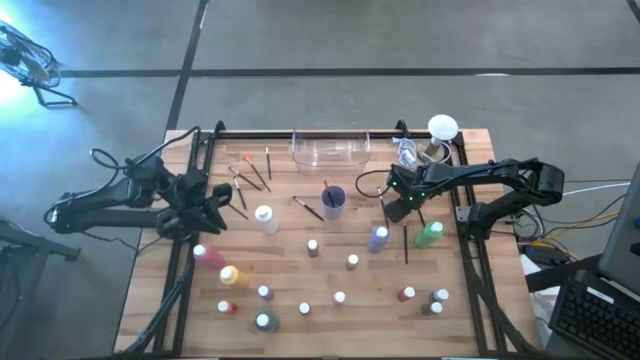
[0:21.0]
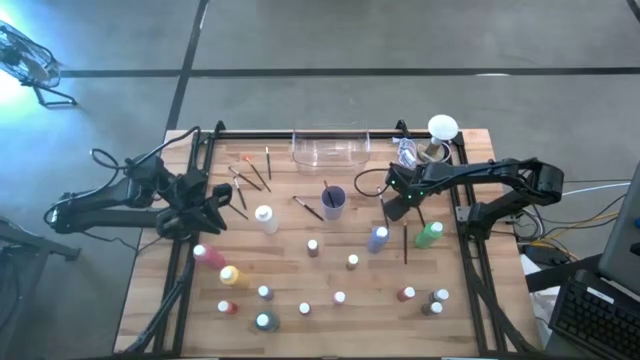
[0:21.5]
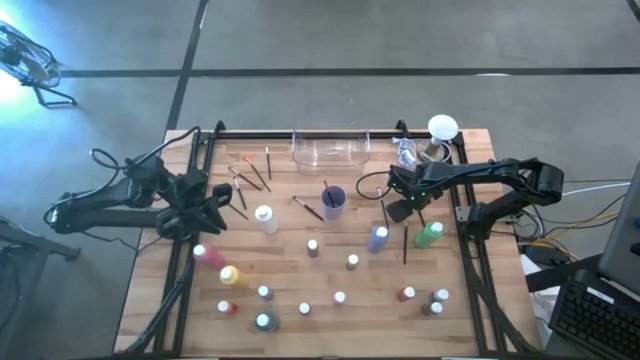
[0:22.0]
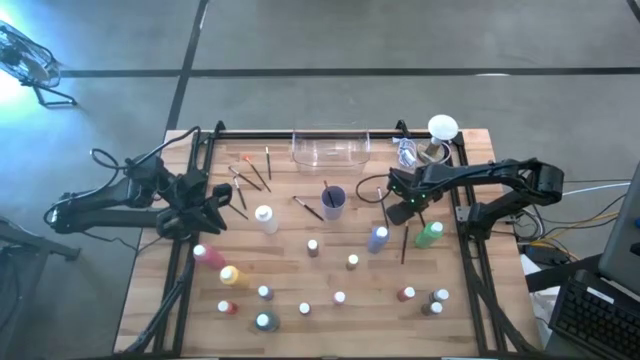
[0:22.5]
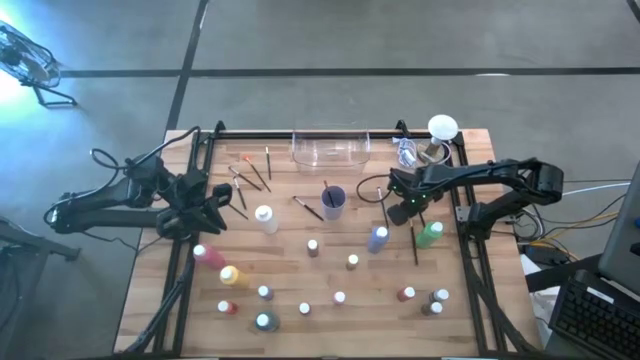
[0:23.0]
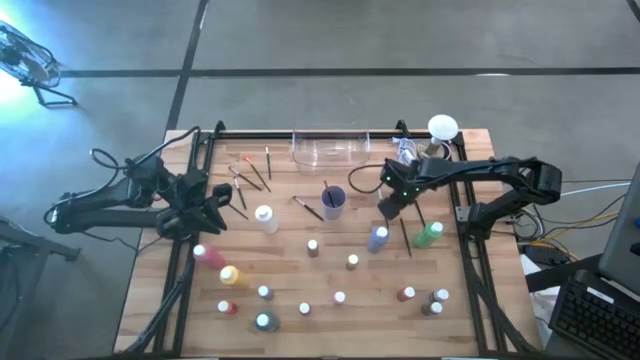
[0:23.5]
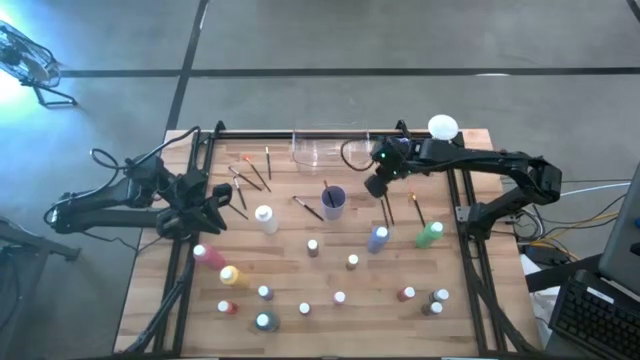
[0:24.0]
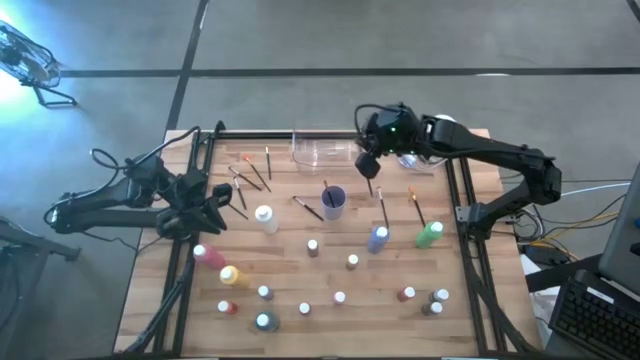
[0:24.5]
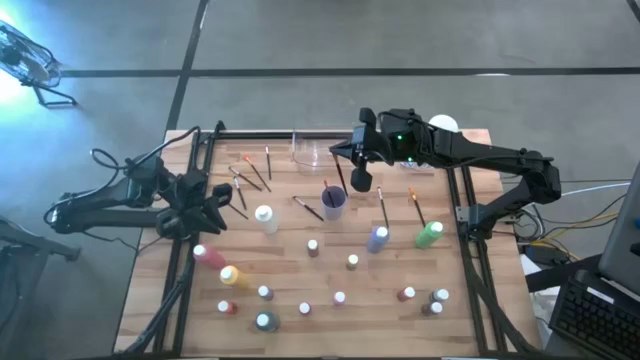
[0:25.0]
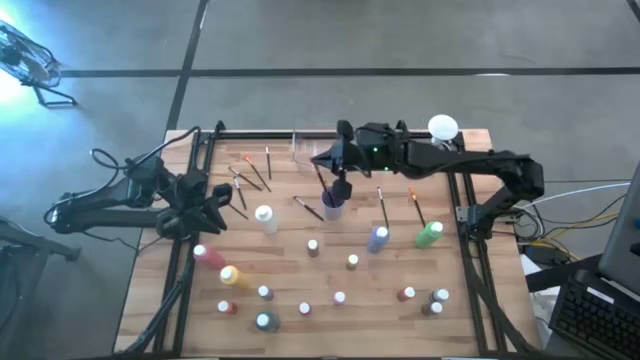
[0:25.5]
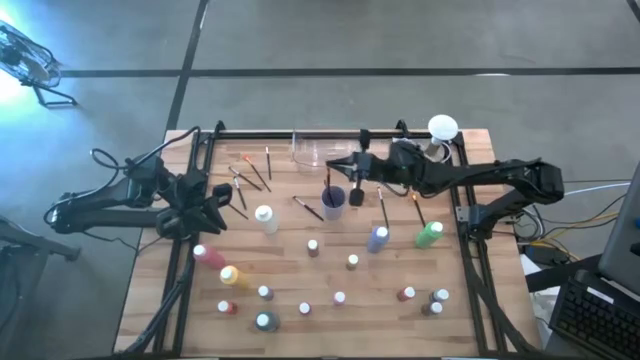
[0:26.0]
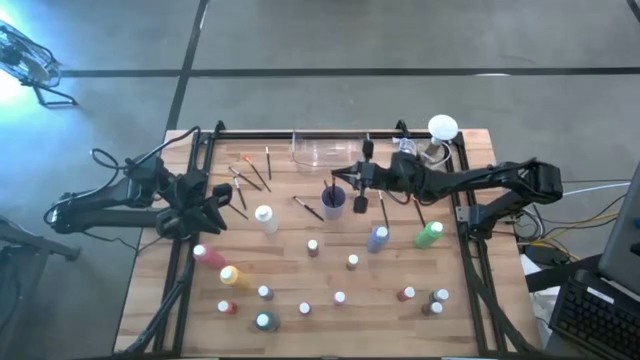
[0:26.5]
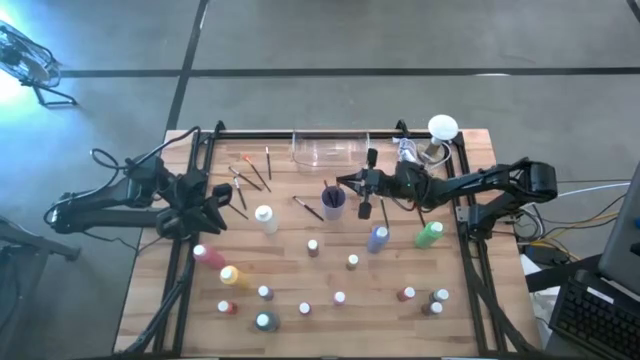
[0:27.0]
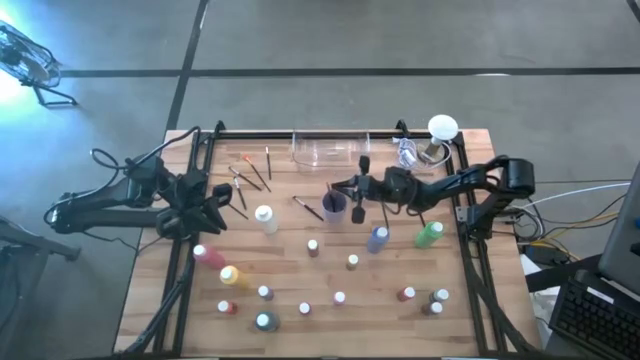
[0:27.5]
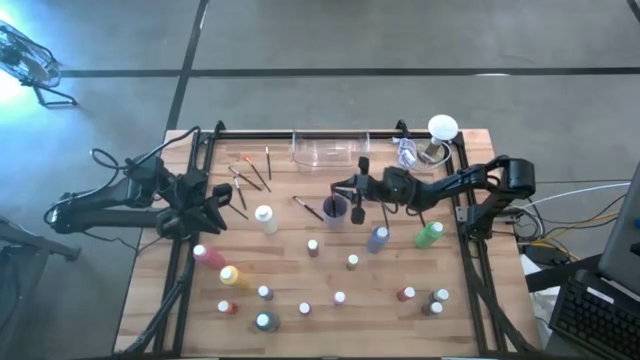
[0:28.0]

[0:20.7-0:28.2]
Task: Pick & Place Paint Supplies
Put the gold paint brush into the purple cup

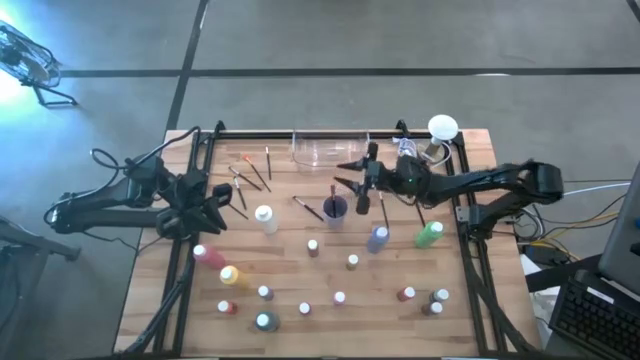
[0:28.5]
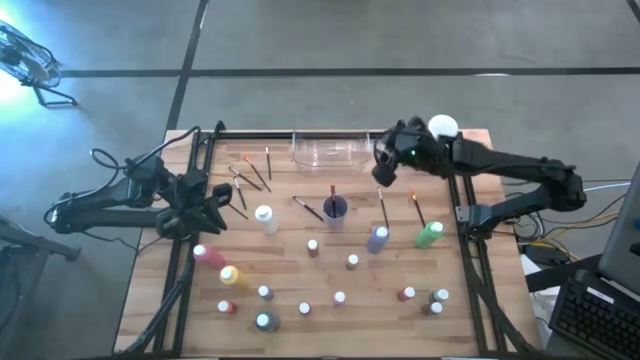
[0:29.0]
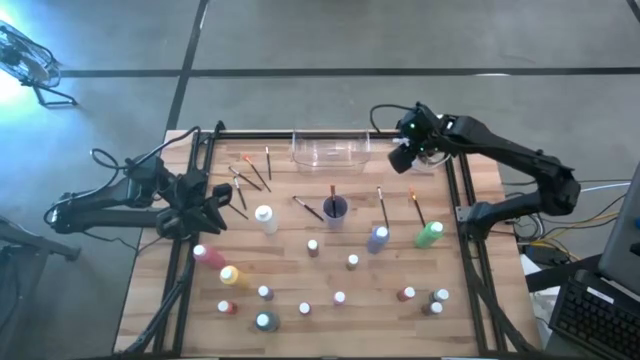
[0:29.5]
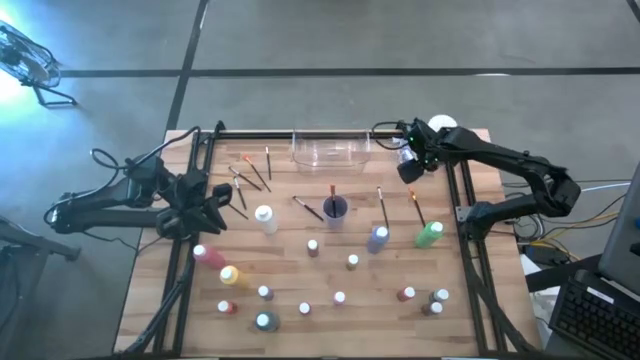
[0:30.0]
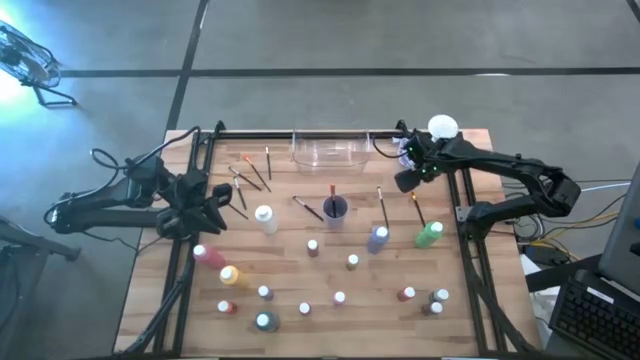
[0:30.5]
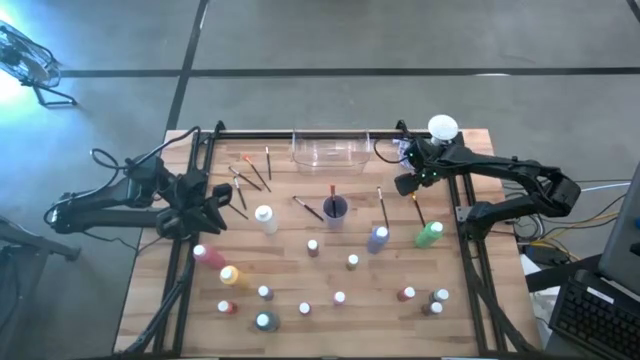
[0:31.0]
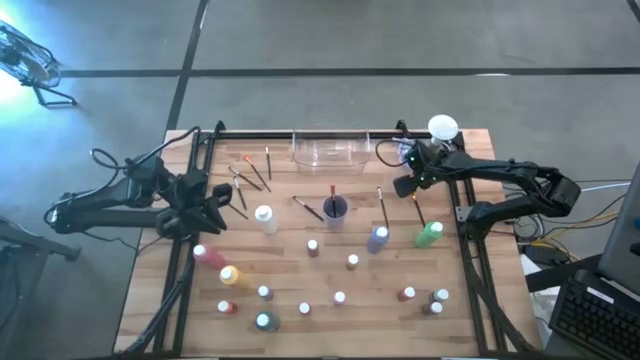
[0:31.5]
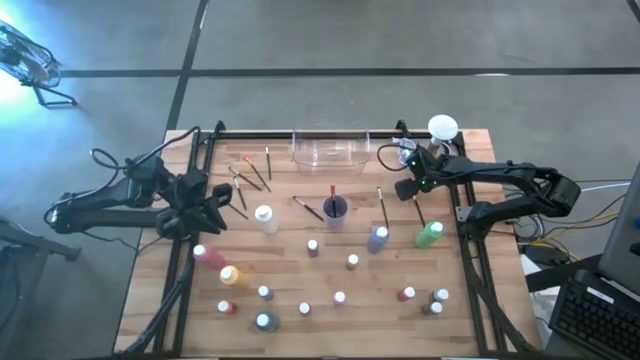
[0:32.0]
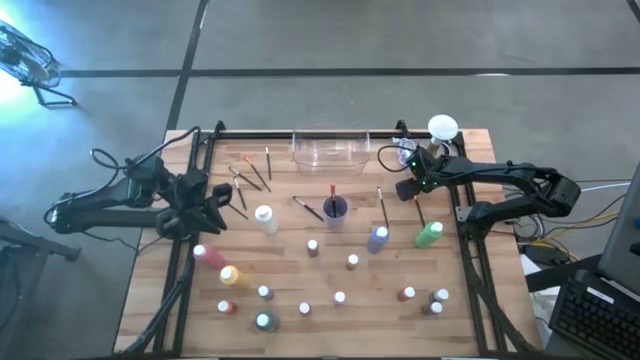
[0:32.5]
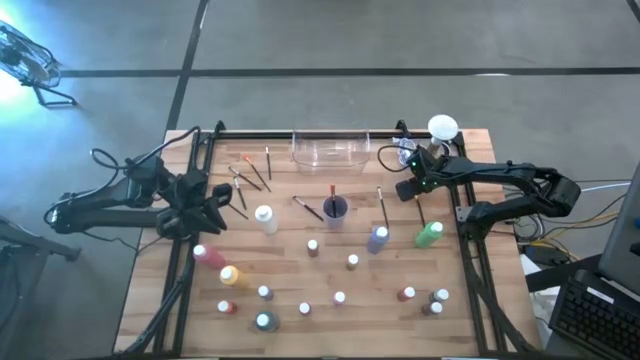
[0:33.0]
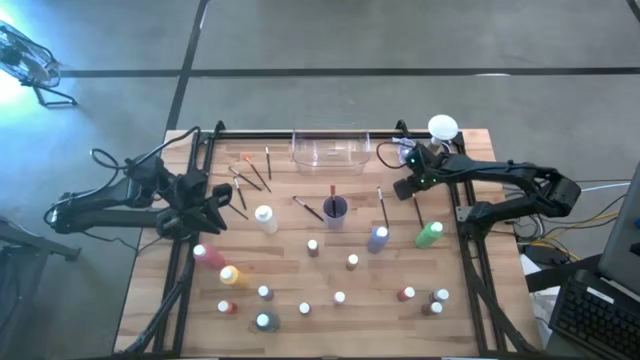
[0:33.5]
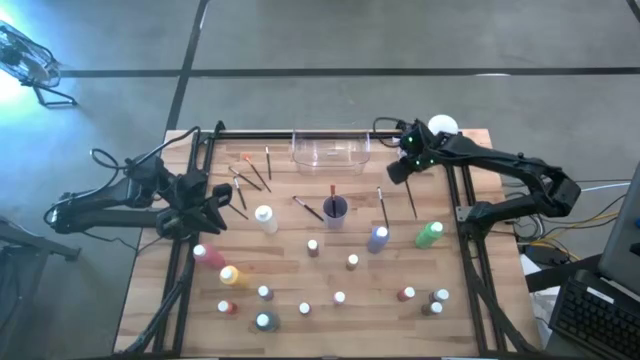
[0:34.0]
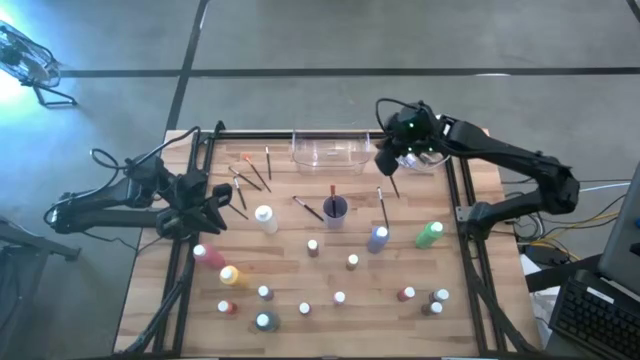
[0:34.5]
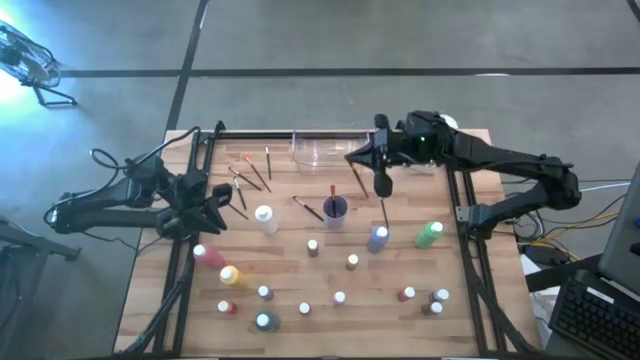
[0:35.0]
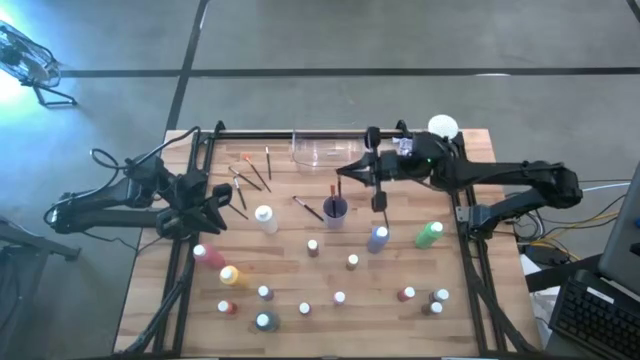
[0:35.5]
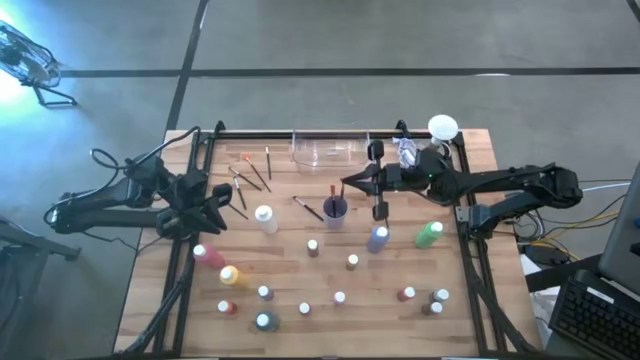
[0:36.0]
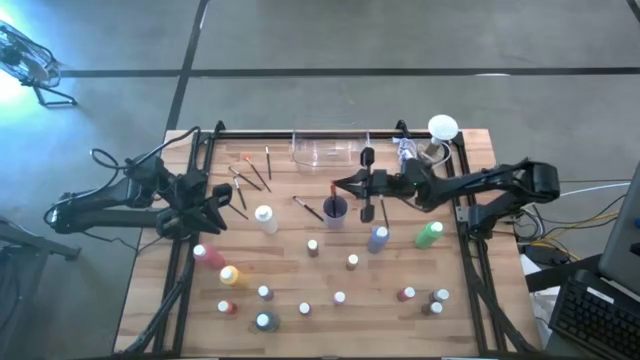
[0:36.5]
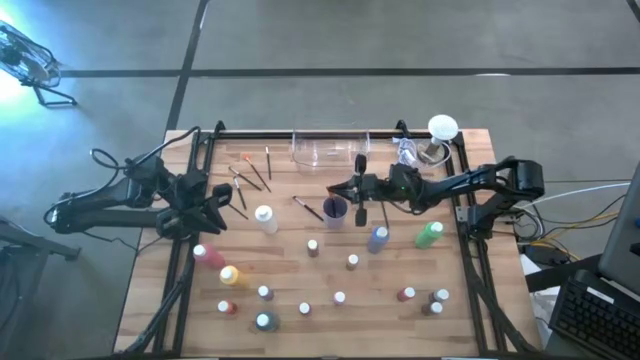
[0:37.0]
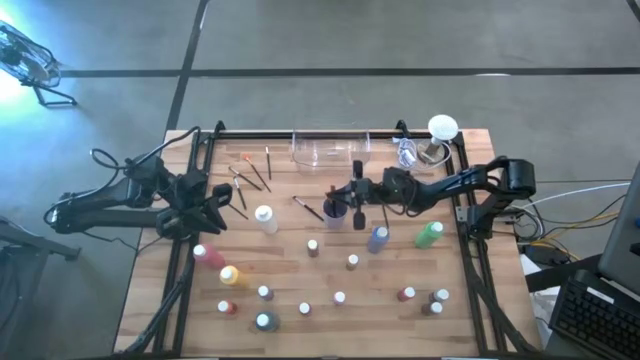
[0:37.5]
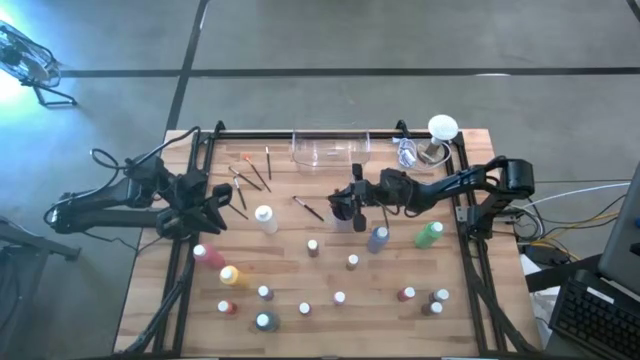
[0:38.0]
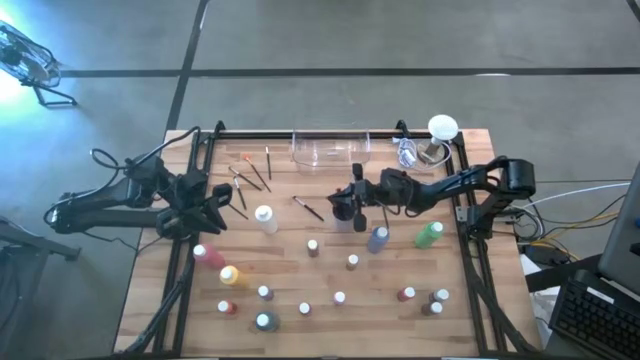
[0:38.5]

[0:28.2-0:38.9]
Put the gold paint brush into the purple cup

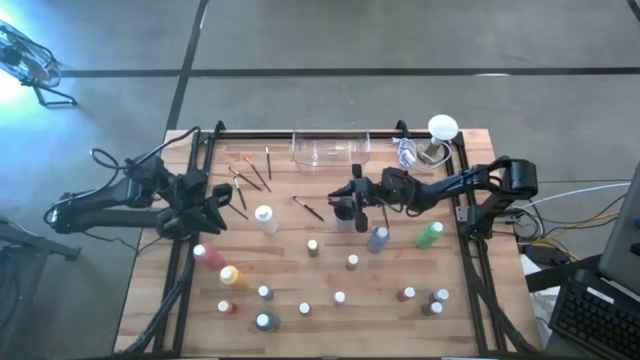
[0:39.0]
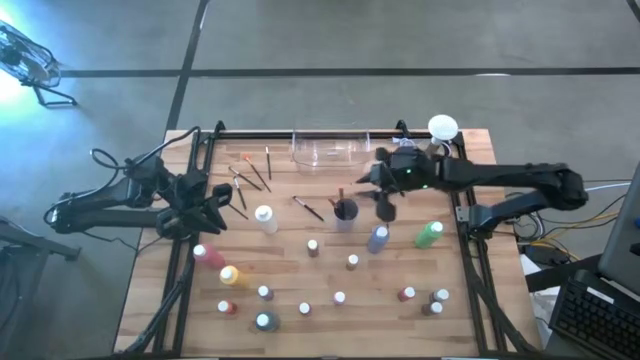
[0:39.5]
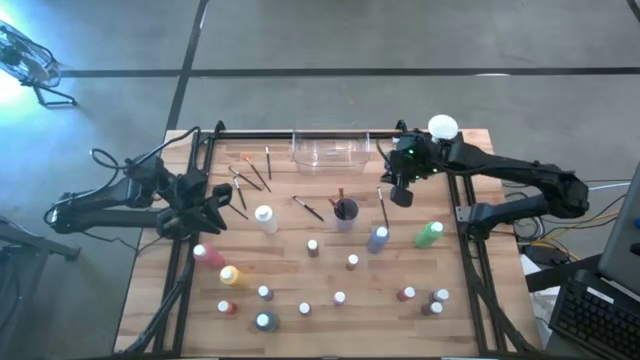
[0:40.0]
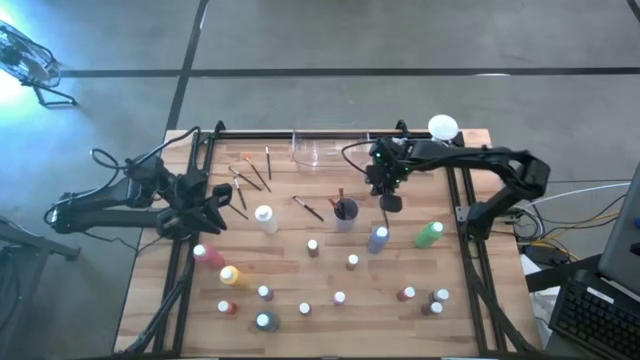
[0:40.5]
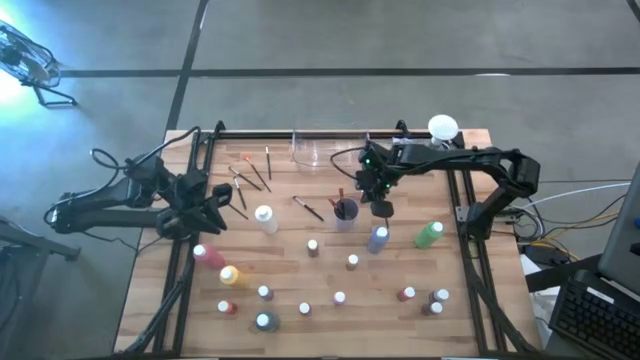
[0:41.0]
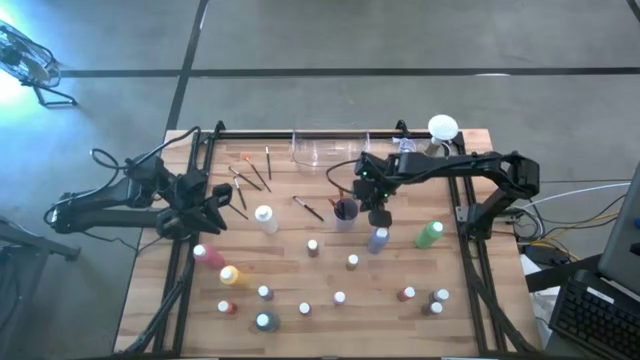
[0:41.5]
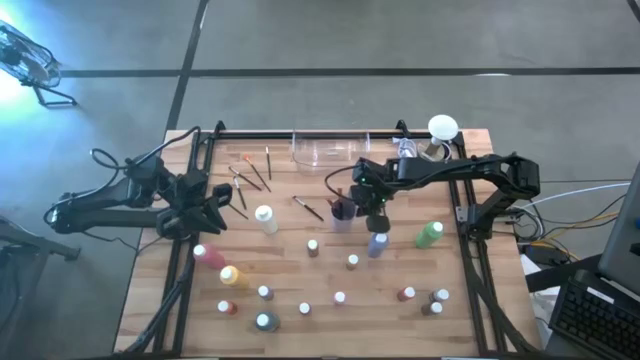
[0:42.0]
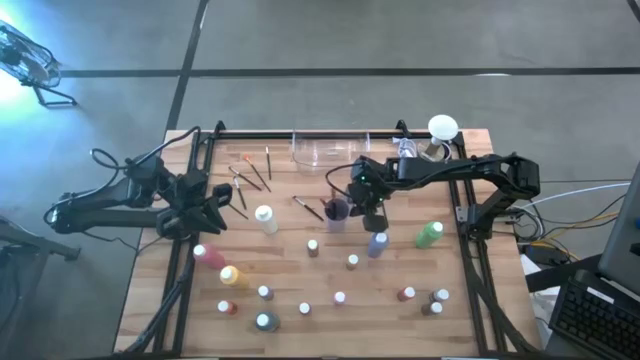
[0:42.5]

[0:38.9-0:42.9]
Adjust the purple cup
